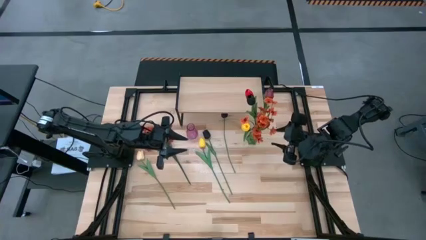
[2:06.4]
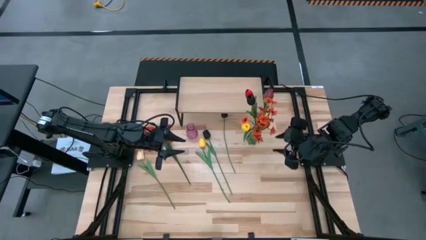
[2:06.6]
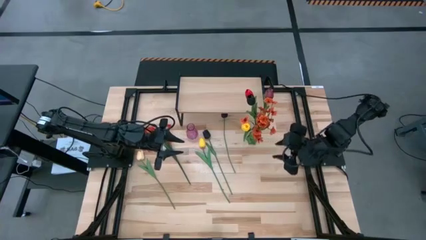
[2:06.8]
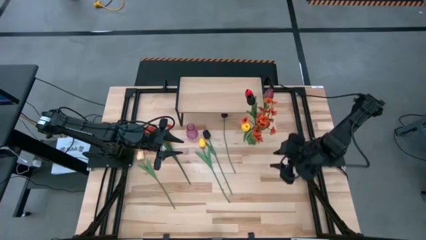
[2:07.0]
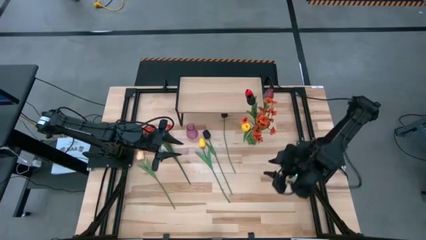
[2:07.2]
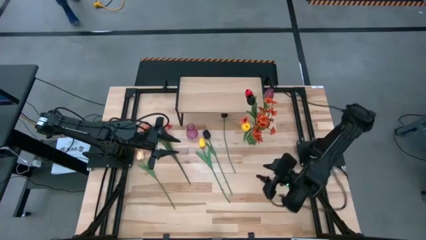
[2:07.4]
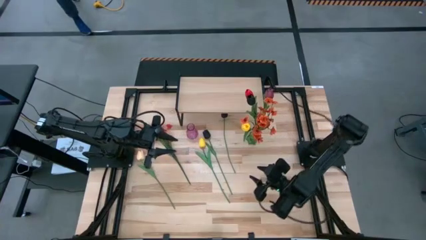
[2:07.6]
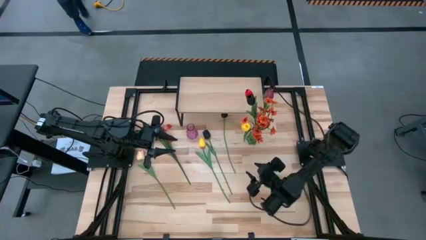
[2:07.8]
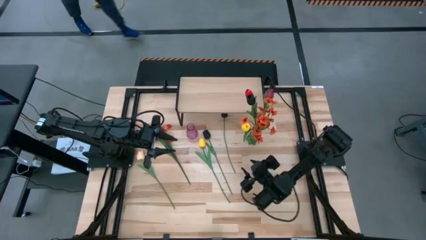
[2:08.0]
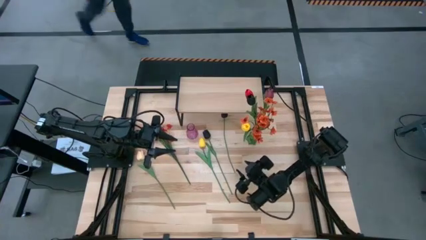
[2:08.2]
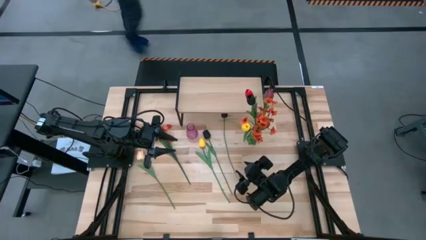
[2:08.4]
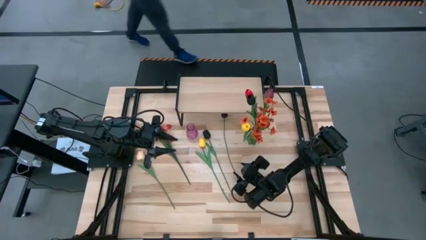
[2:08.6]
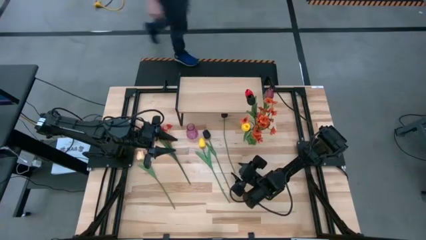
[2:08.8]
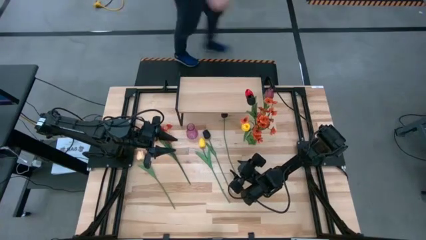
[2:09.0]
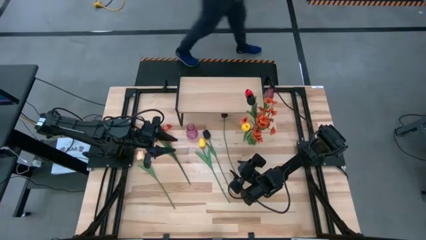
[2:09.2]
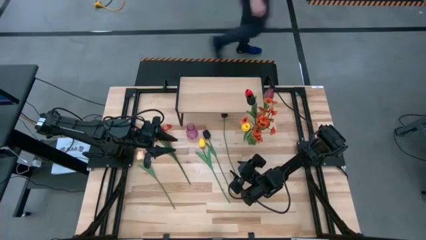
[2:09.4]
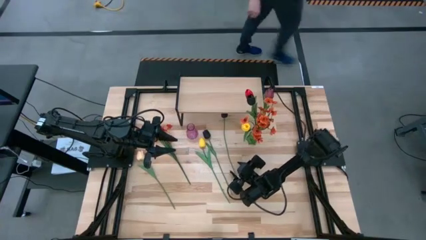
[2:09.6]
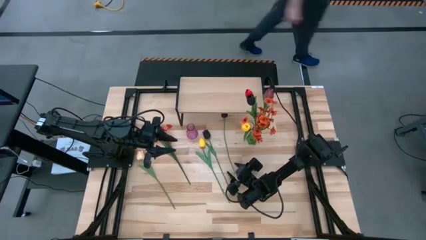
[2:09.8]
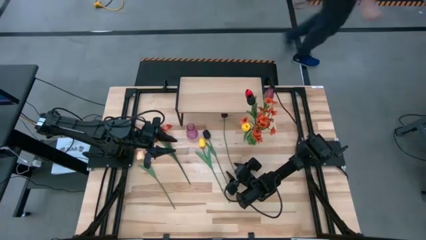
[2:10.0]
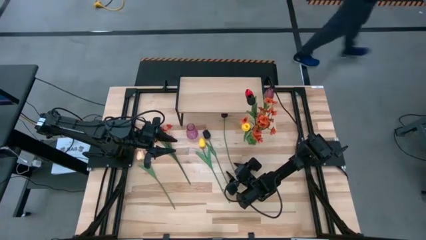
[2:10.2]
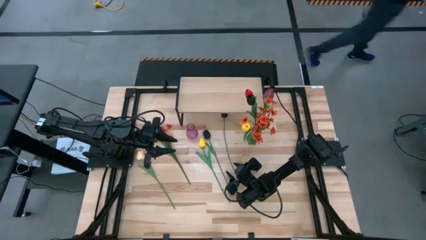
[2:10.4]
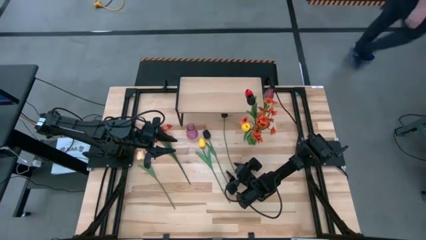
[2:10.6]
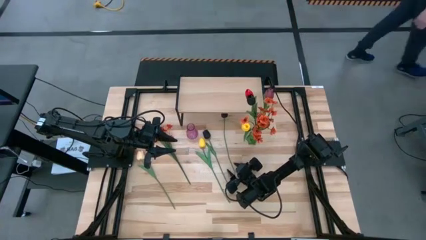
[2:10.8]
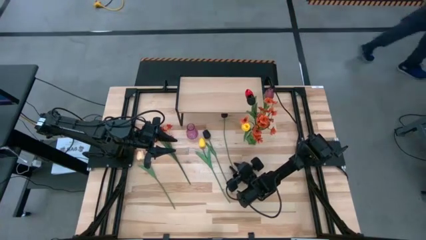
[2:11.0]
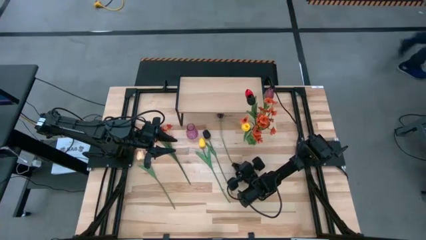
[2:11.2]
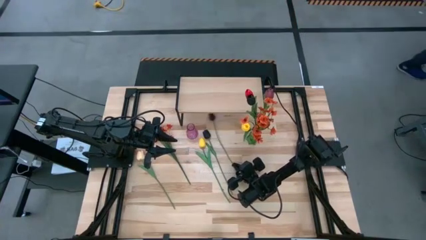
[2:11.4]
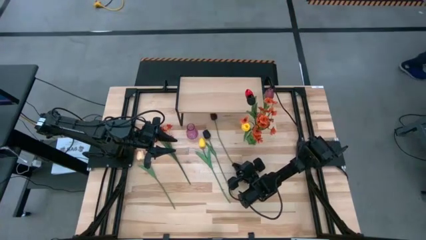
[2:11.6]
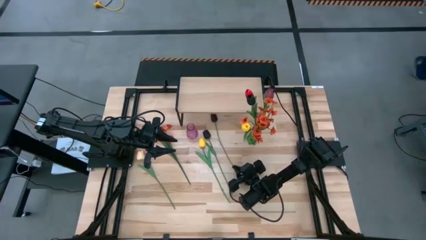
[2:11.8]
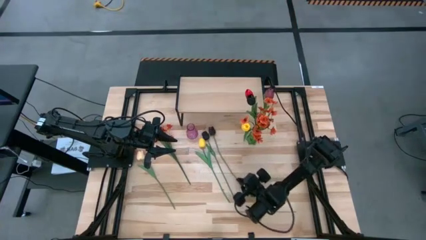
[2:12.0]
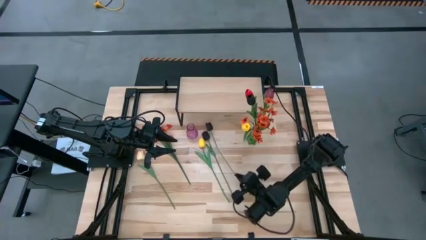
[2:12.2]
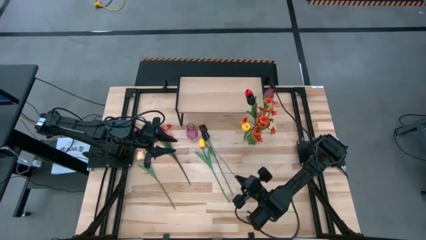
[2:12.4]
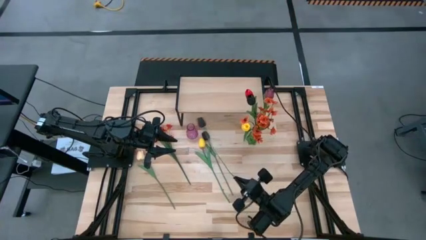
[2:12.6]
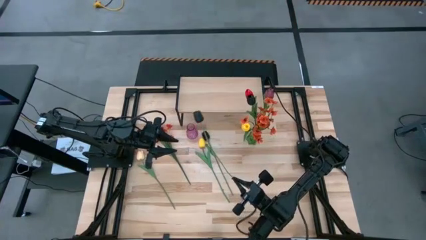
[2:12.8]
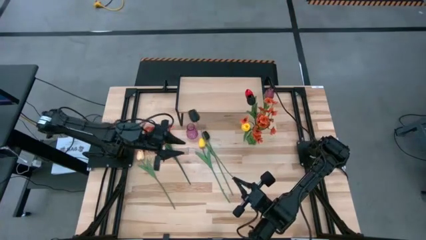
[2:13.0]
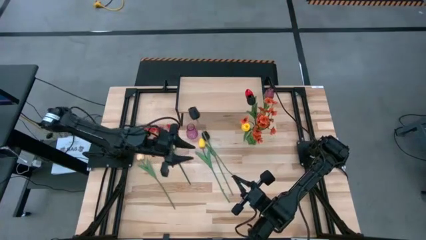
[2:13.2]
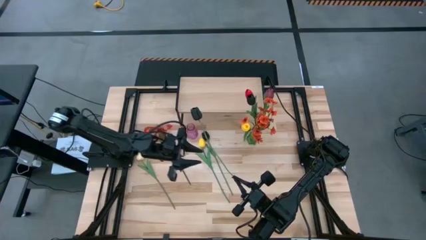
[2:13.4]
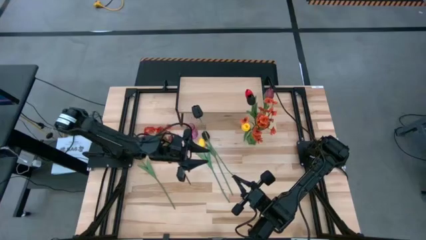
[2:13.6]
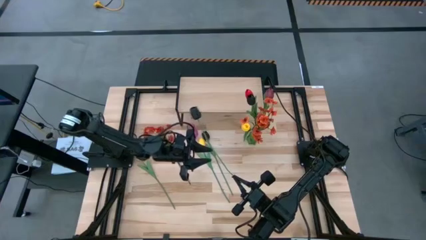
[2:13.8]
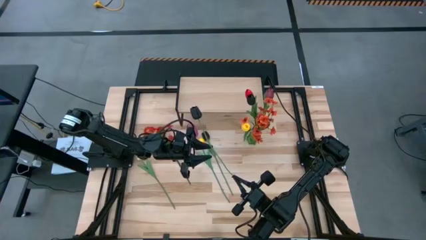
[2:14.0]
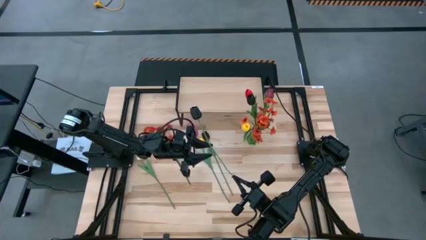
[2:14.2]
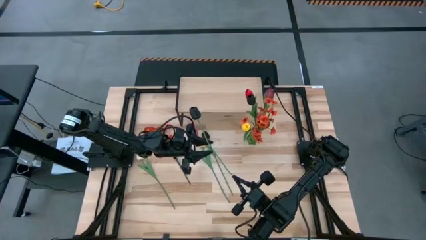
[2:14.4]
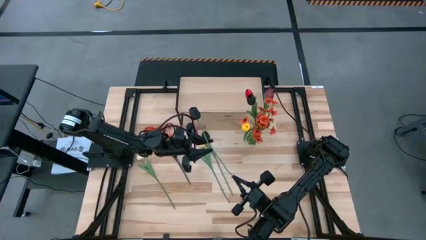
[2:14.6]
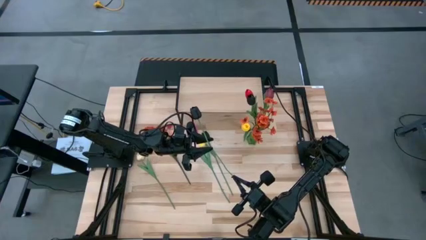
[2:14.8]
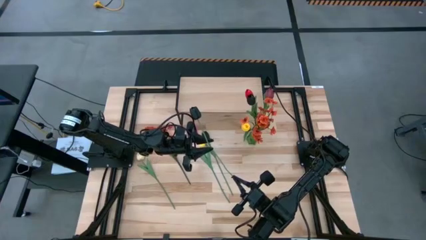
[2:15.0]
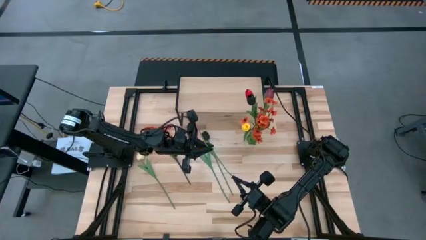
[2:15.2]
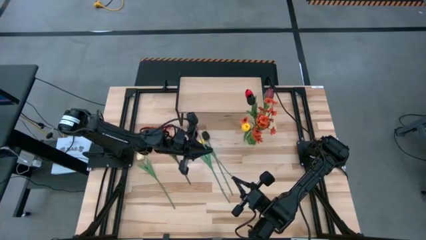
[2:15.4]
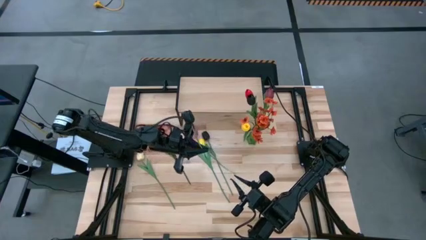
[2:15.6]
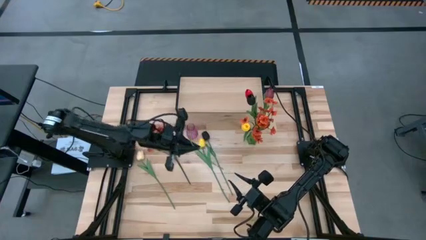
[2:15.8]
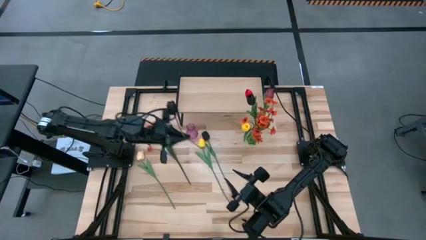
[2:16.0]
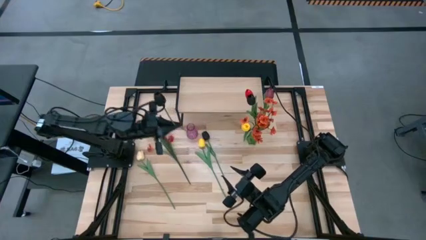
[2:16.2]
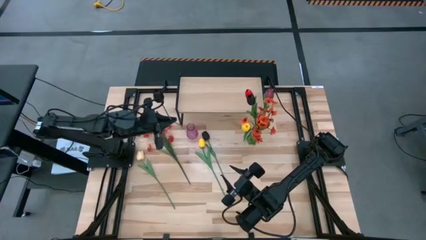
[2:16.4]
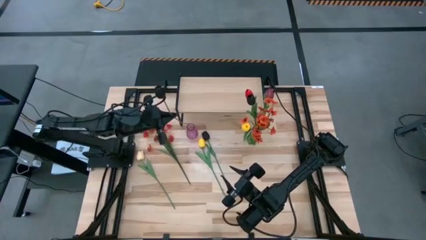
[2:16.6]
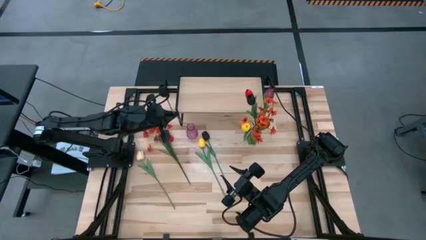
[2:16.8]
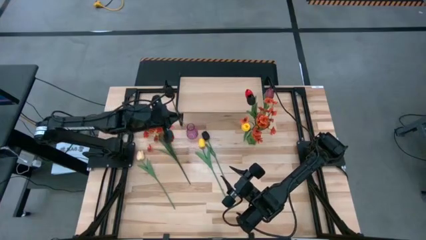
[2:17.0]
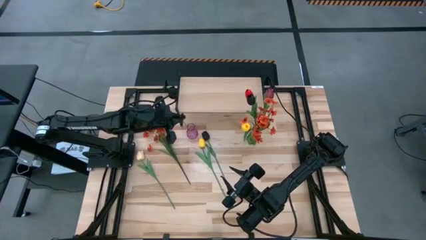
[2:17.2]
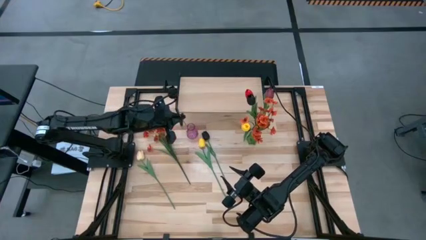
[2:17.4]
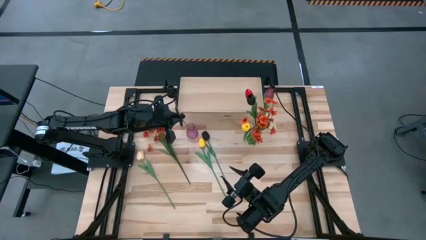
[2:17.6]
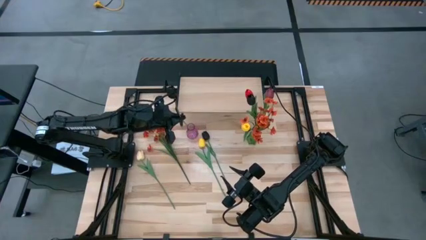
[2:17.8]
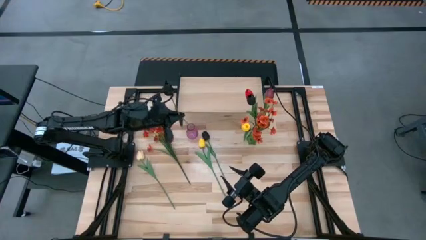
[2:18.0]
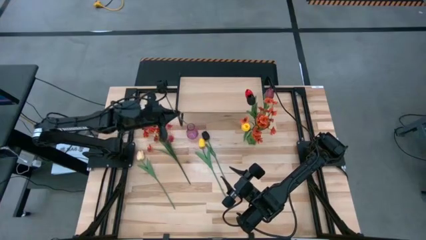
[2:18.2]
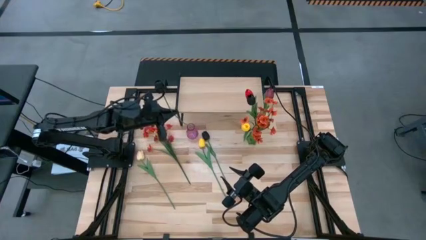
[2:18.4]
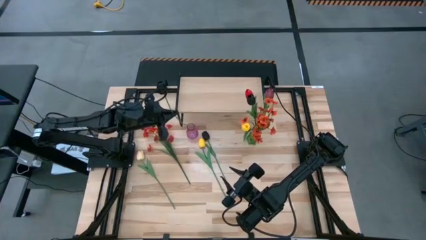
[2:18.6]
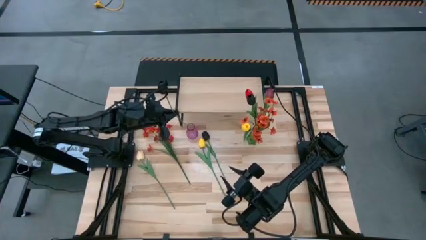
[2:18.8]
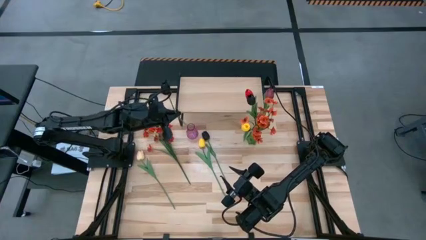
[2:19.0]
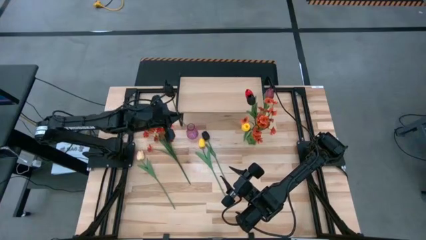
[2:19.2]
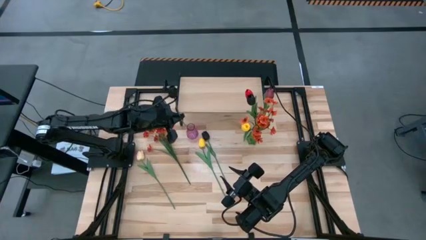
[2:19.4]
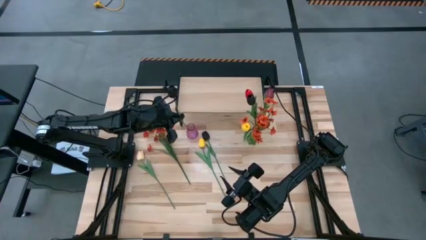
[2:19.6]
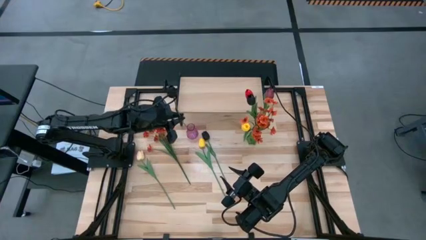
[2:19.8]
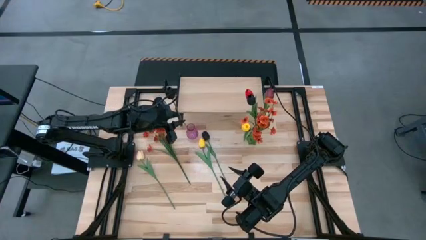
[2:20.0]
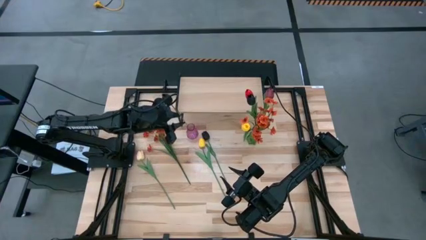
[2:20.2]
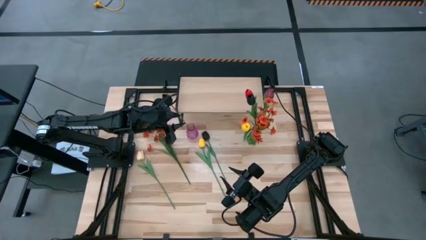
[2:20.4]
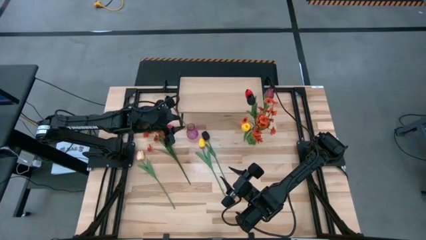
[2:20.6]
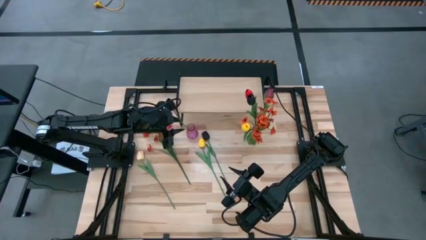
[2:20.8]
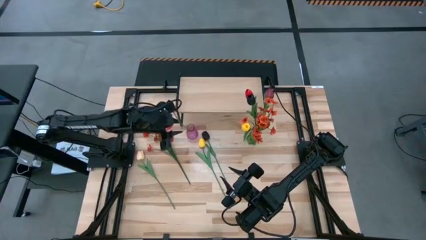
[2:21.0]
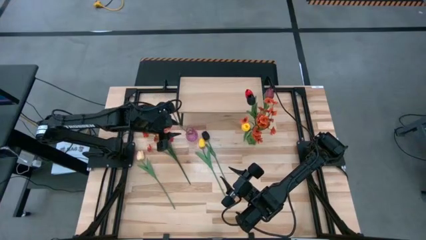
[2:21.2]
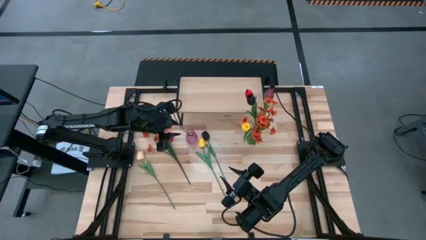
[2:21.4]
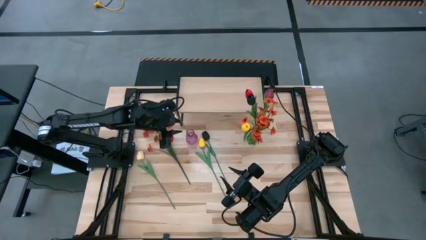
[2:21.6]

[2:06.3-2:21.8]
Task: Pick and place flowers into a vace then onto a shelf
Put the top black tulip into the purple vase
